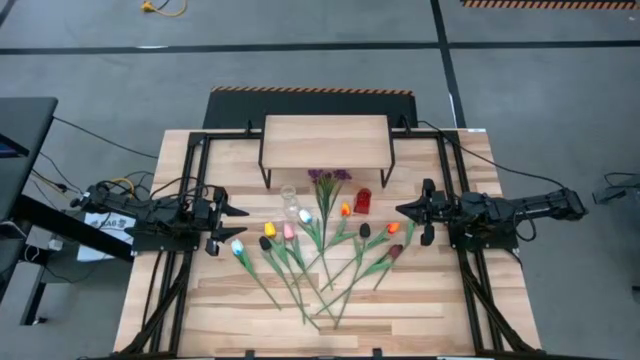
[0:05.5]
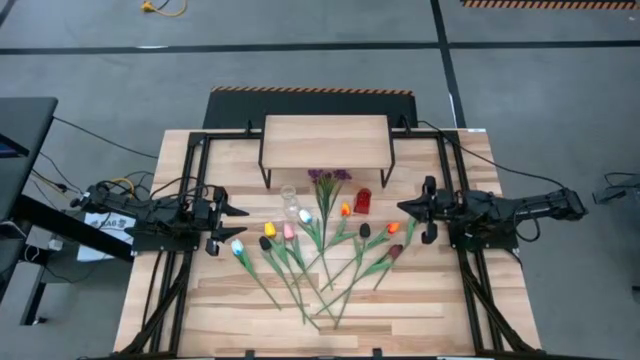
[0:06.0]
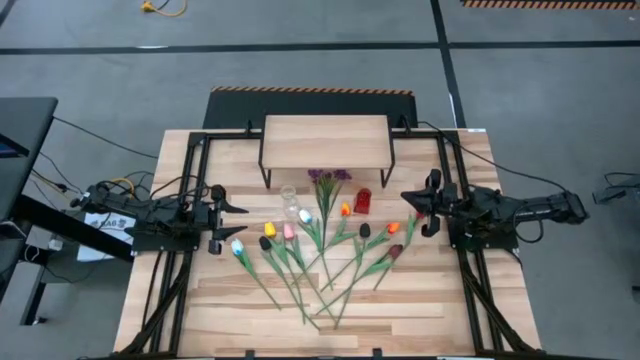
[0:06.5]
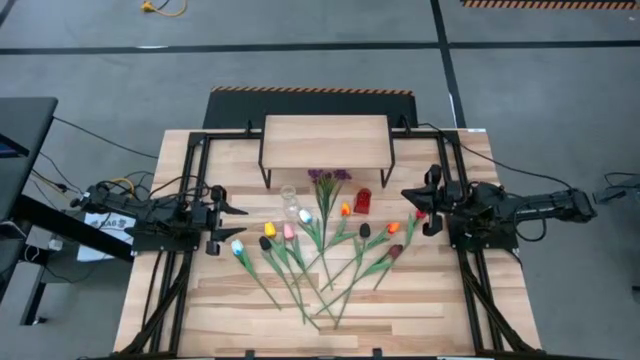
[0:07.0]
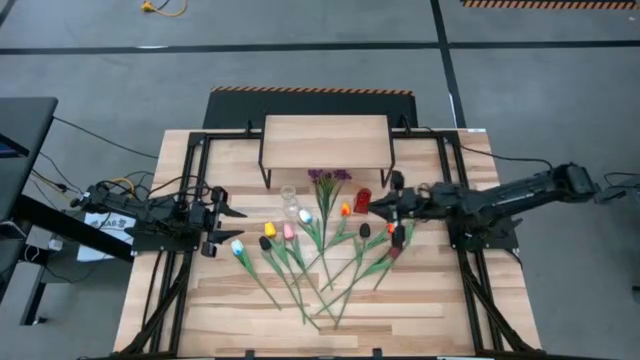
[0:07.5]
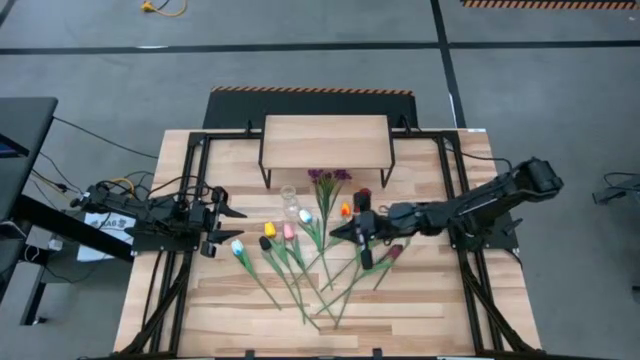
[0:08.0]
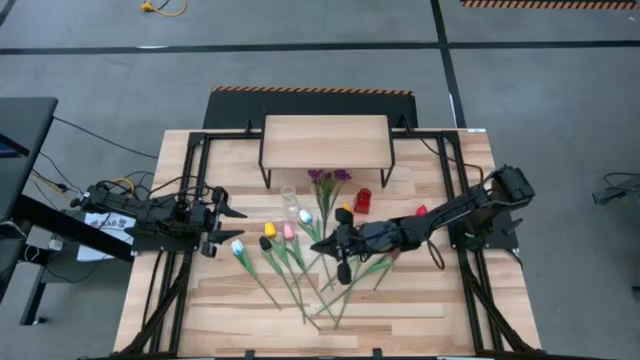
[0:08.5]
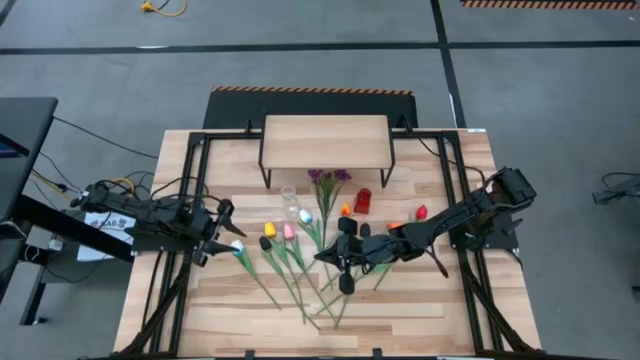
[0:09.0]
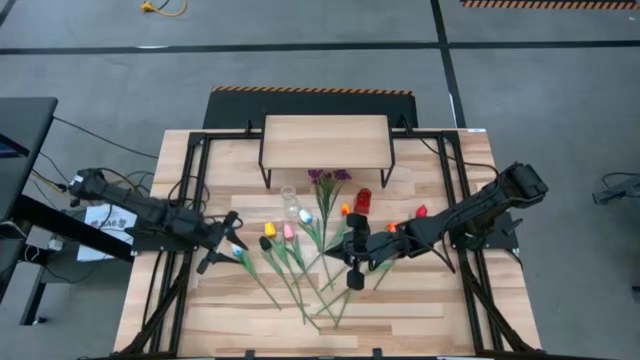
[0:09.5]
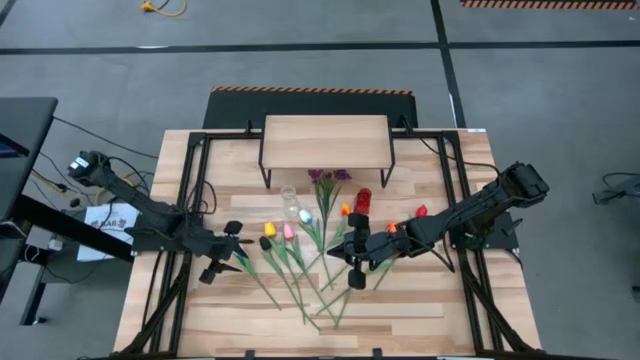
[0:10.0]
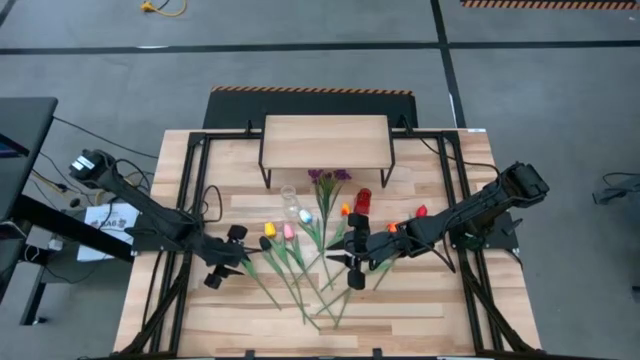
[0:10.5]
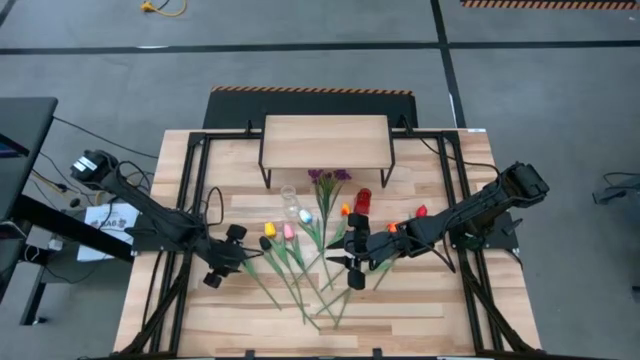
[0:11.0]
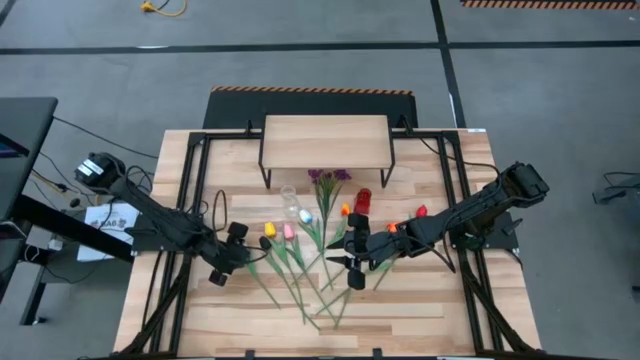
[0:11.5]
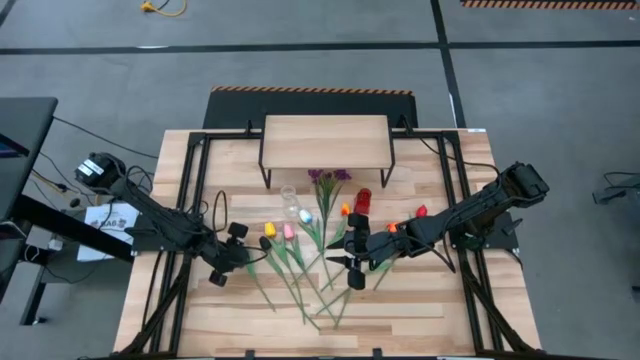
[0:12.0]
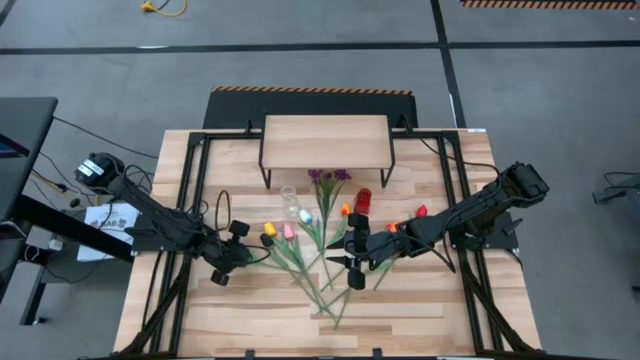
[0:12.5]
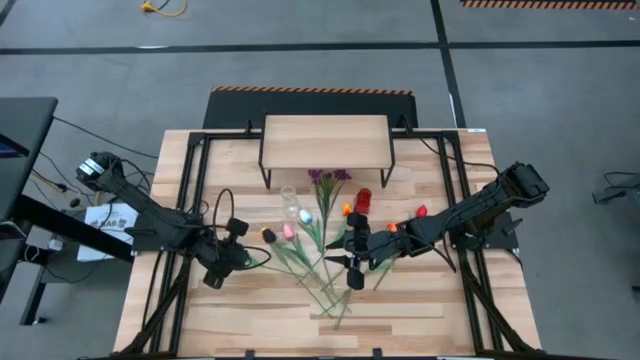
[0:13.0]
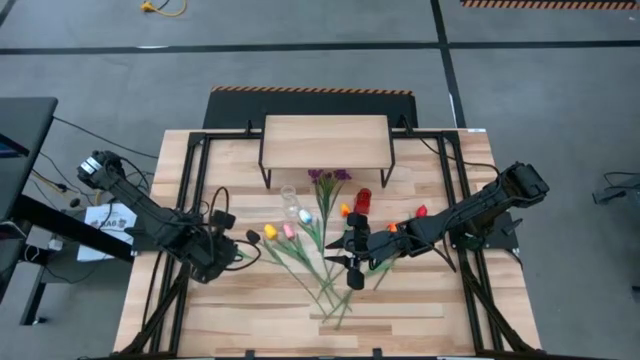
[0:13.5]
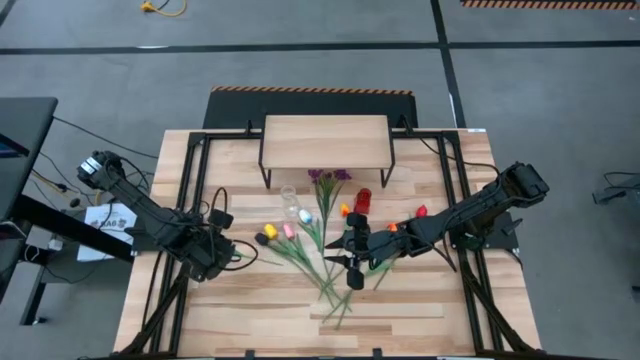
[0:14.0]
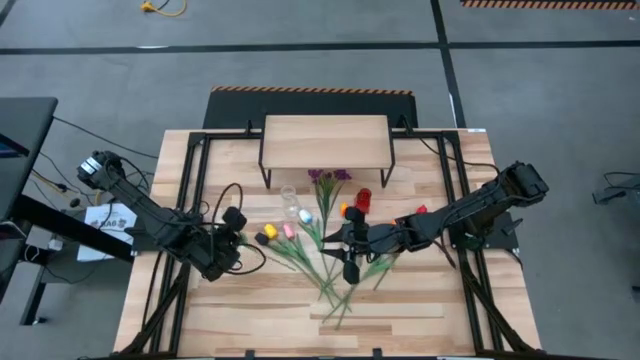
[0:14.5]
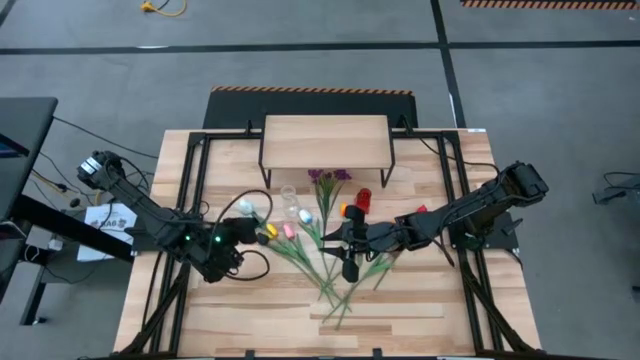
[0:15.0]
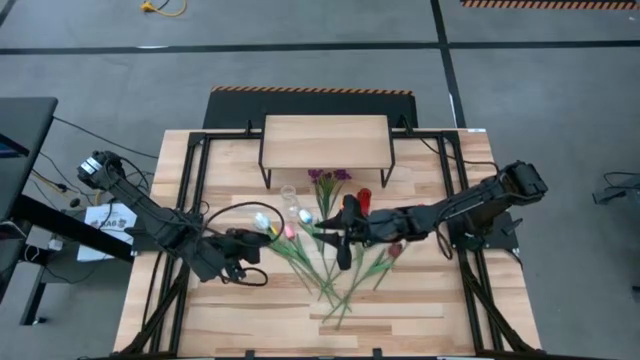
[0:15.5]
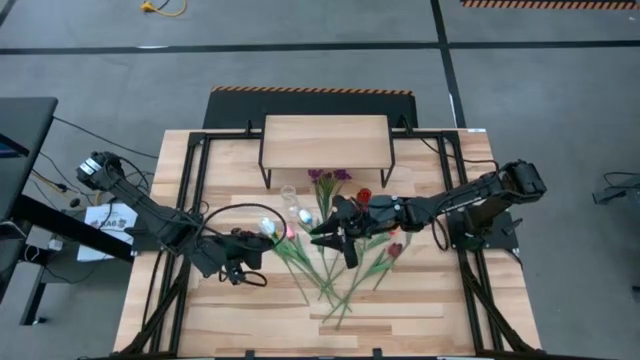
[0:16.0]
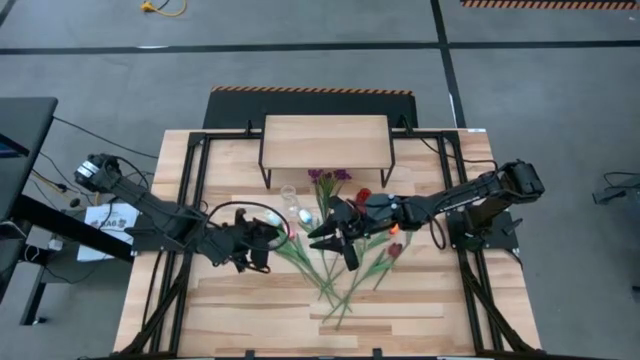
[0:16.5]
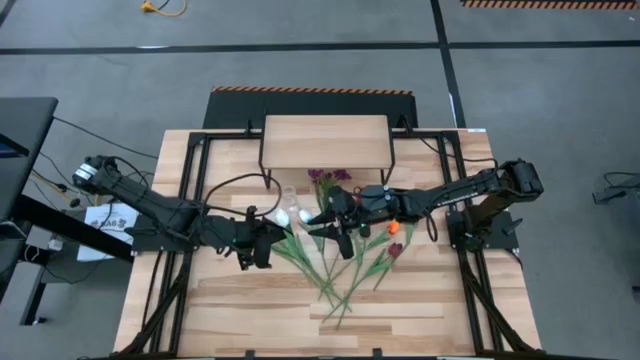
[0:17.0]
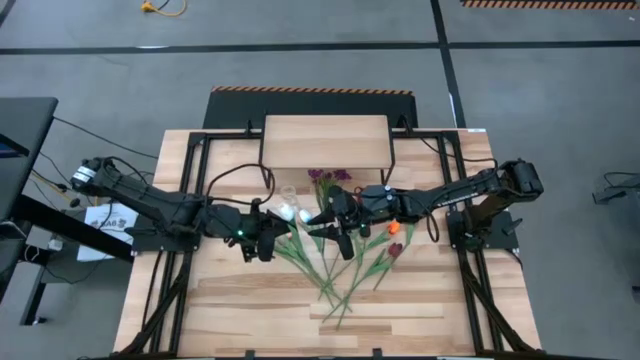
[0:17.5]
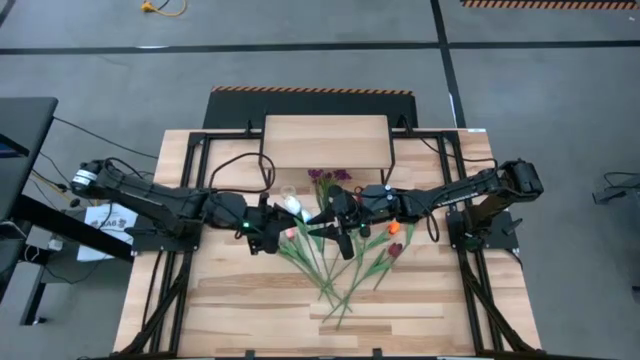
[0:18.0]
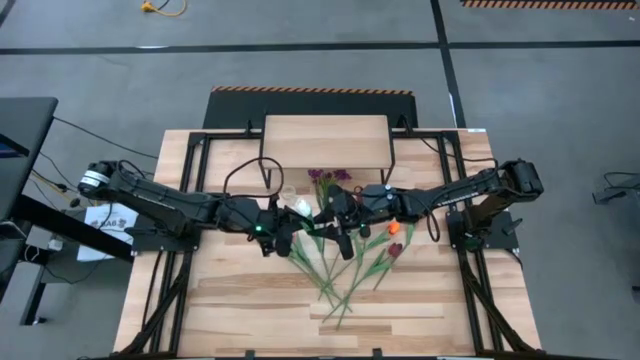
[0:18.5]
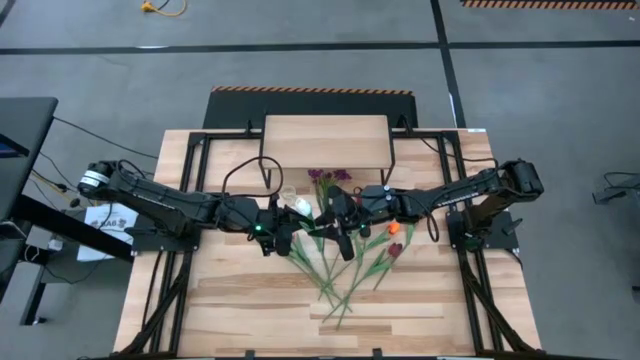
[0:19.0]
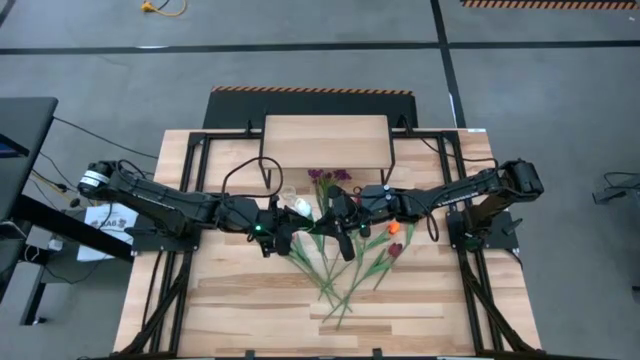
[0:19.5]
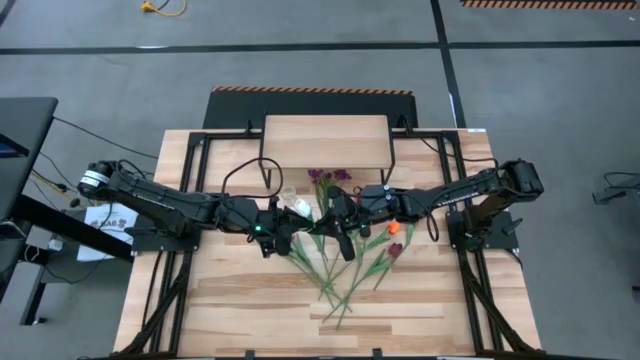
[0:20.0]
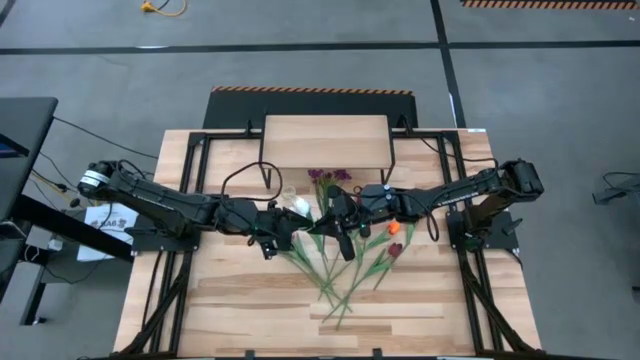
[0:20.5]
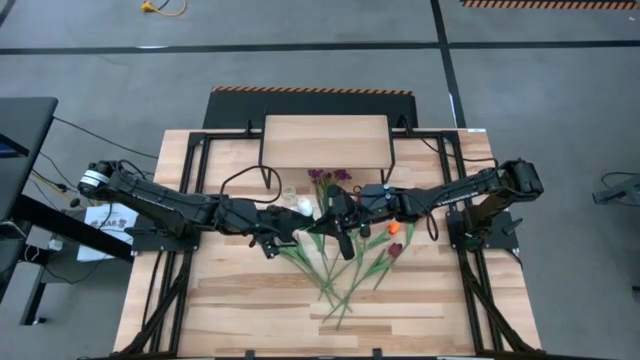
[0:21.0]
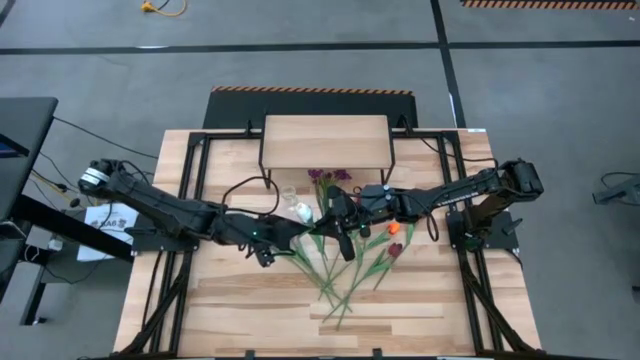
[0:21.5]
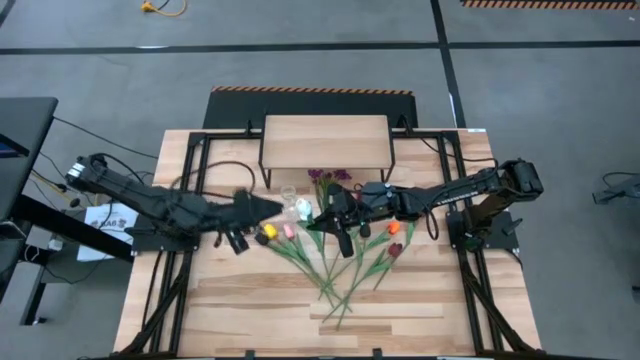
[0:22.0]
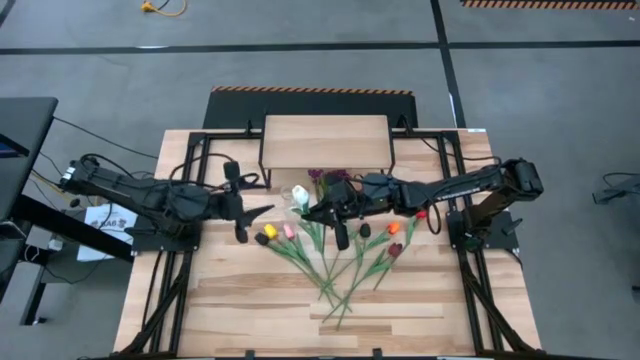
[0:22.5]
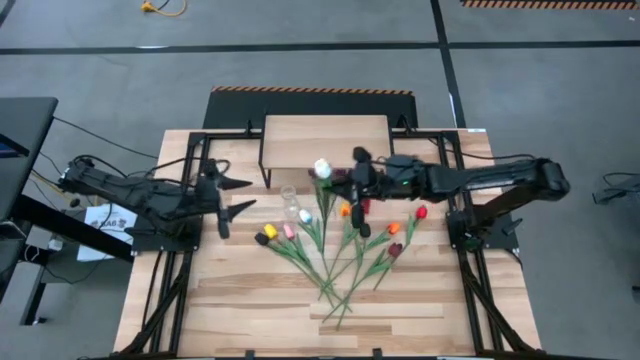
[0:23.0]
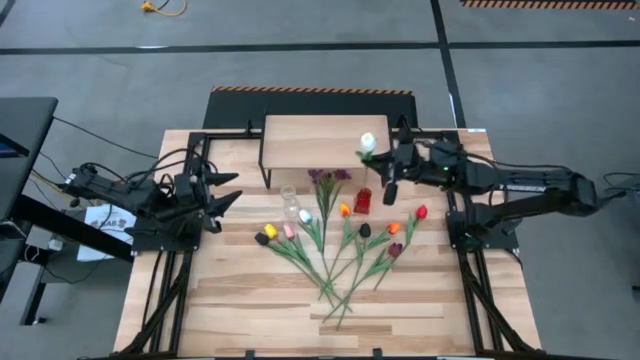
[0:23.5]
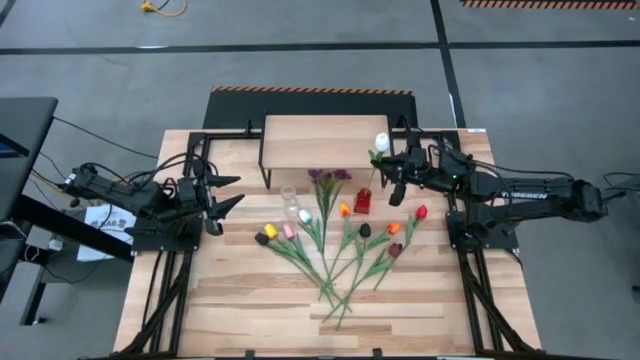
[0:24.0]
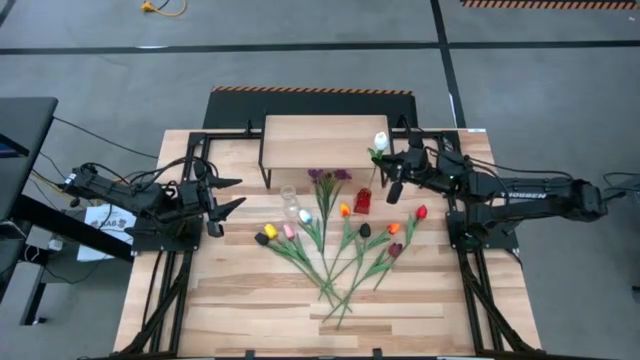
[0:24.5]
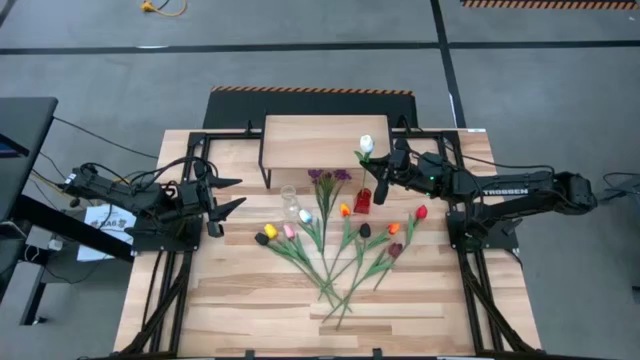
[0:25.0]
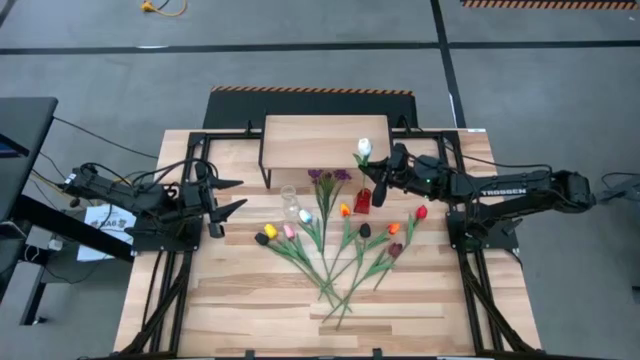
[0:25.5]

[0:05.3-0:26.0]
Task: Pick and place flowers into a vace then onto a shelf
Put the left white blue flower into the red flower vase
